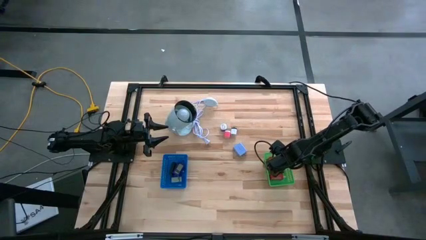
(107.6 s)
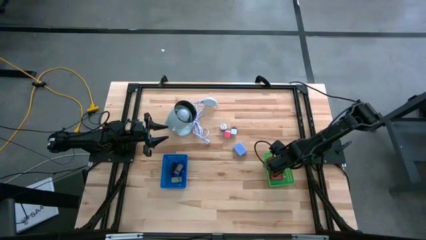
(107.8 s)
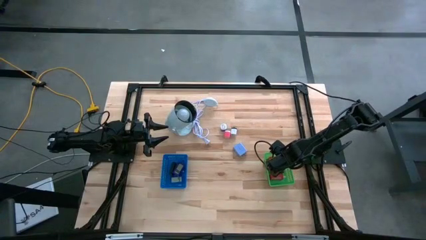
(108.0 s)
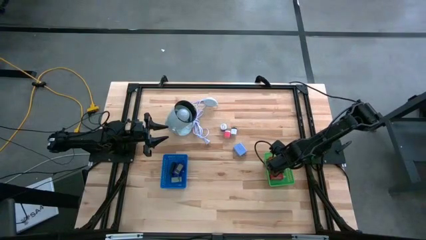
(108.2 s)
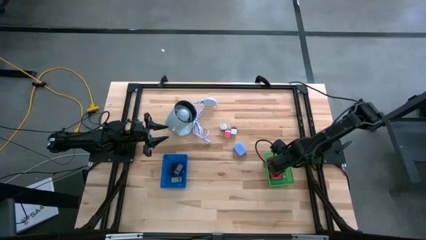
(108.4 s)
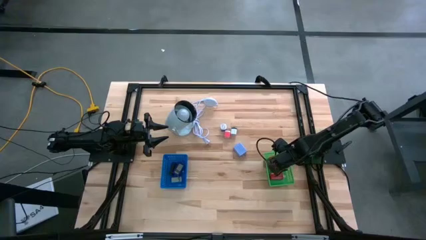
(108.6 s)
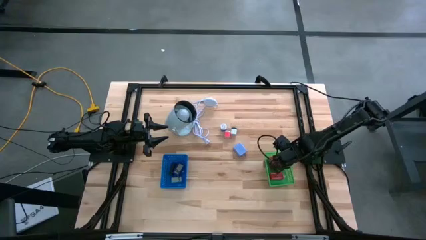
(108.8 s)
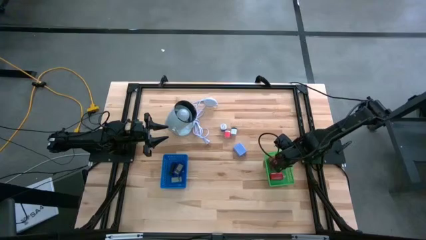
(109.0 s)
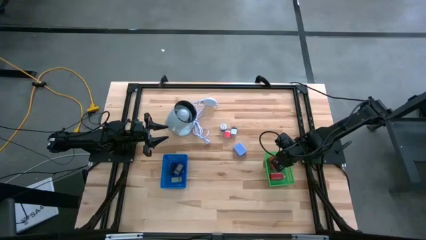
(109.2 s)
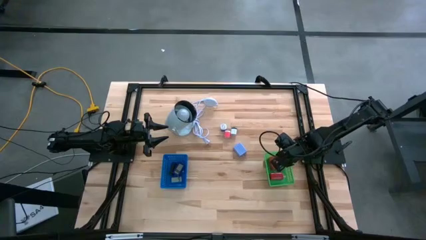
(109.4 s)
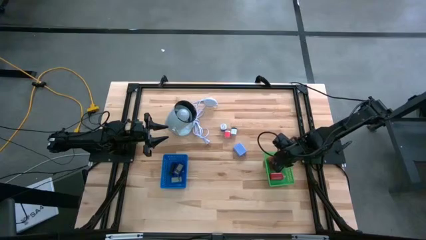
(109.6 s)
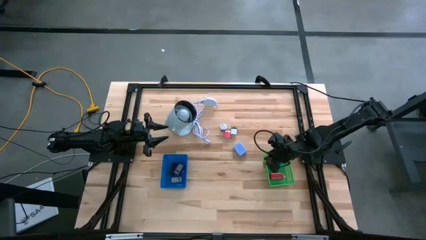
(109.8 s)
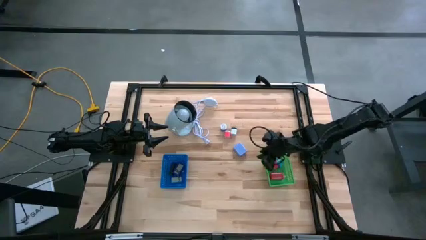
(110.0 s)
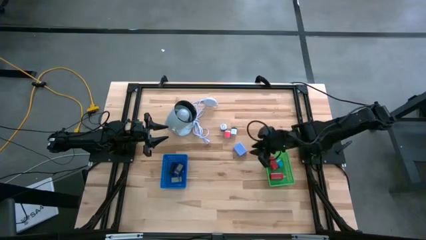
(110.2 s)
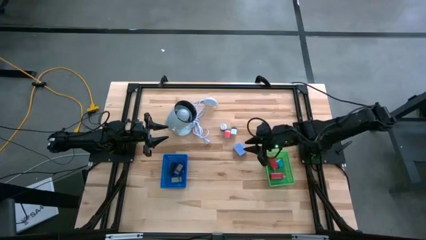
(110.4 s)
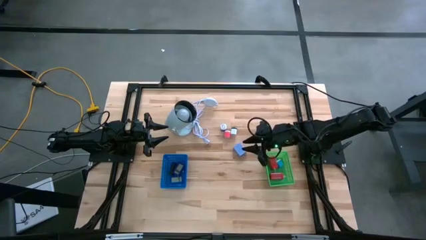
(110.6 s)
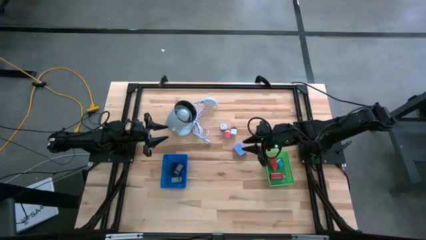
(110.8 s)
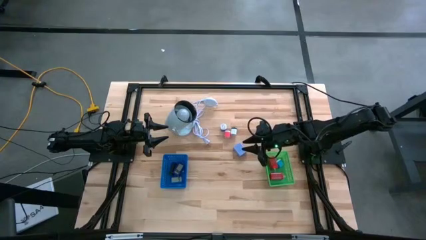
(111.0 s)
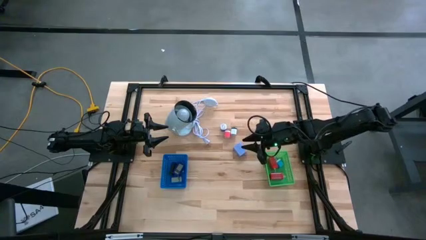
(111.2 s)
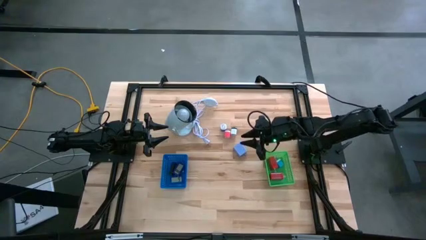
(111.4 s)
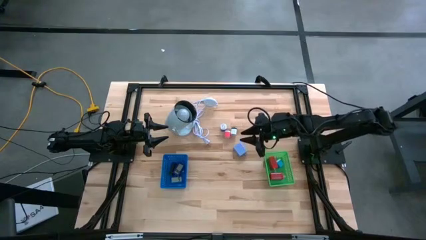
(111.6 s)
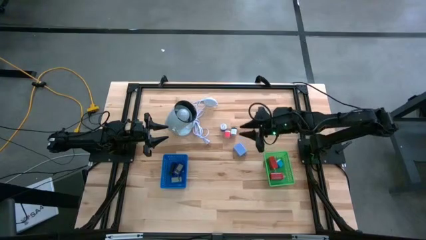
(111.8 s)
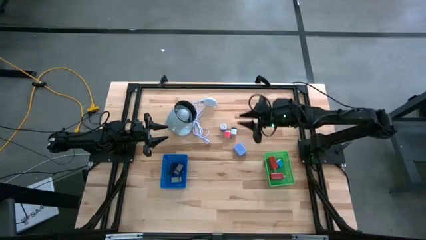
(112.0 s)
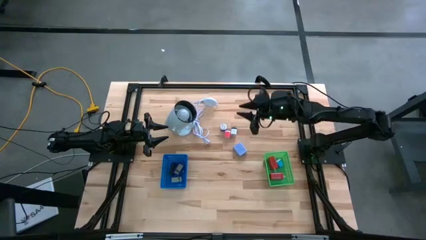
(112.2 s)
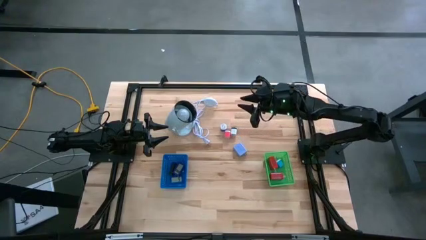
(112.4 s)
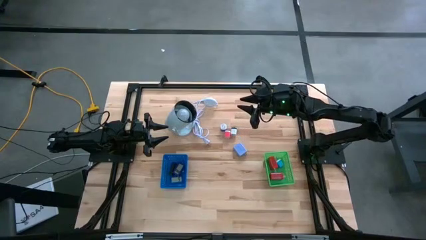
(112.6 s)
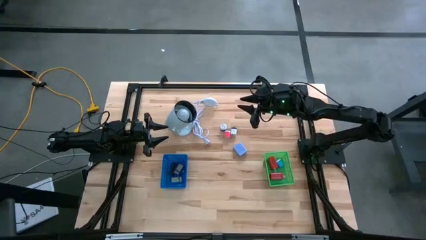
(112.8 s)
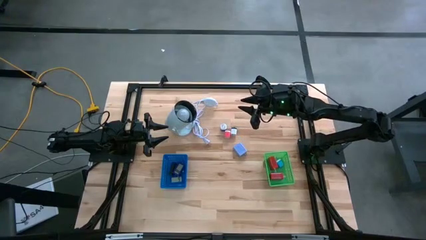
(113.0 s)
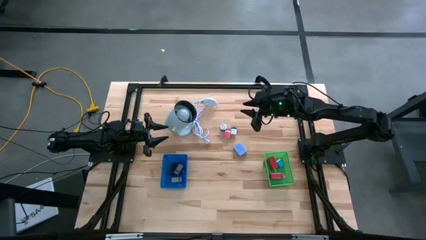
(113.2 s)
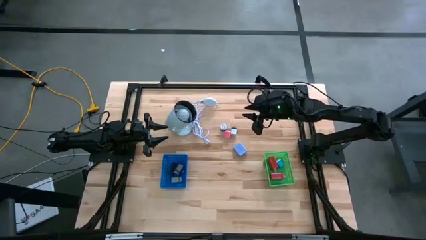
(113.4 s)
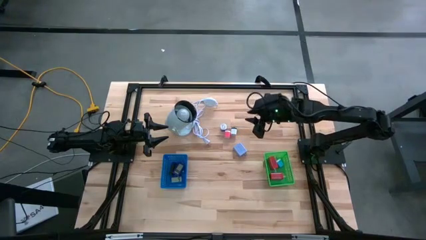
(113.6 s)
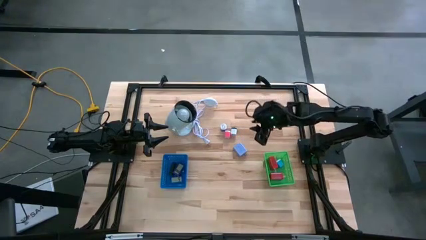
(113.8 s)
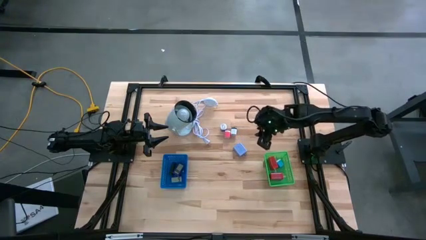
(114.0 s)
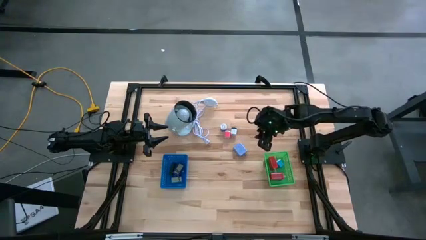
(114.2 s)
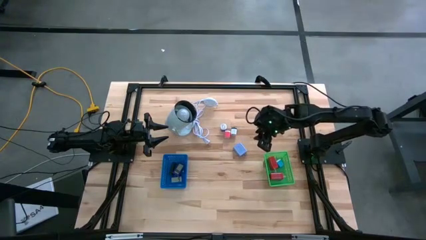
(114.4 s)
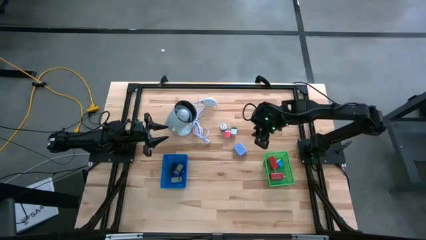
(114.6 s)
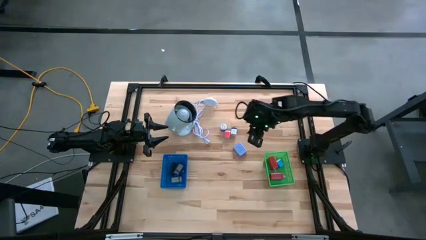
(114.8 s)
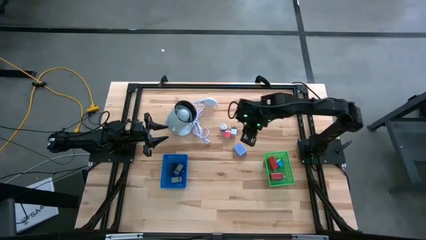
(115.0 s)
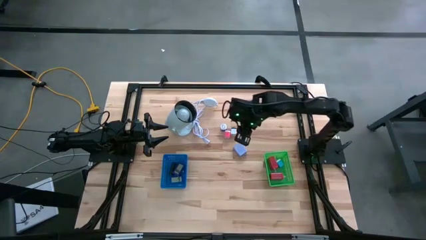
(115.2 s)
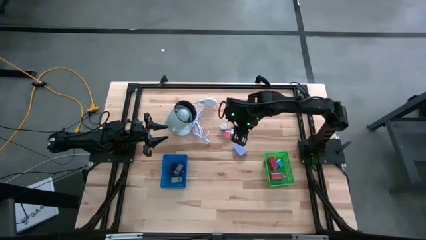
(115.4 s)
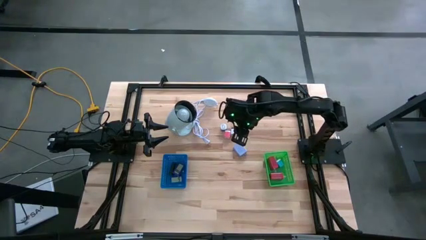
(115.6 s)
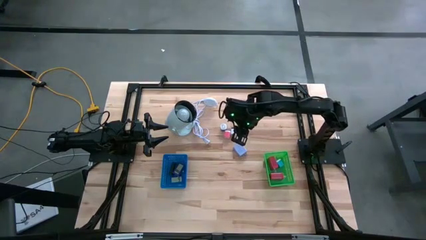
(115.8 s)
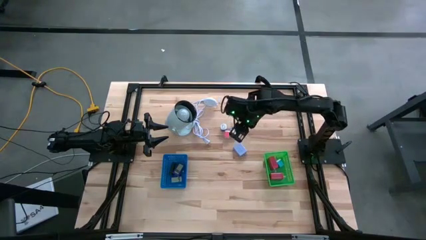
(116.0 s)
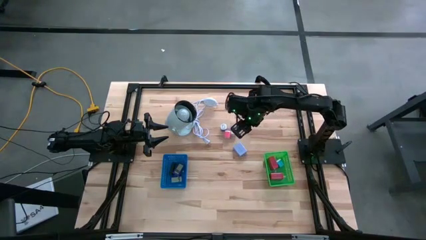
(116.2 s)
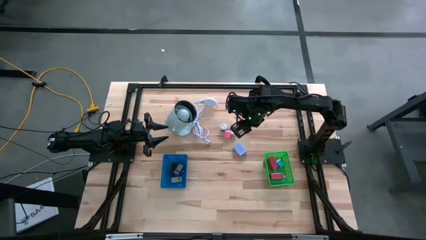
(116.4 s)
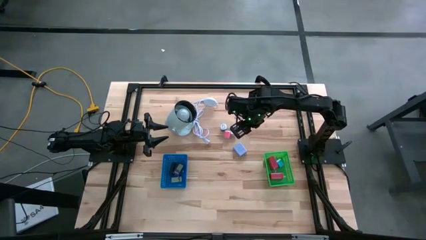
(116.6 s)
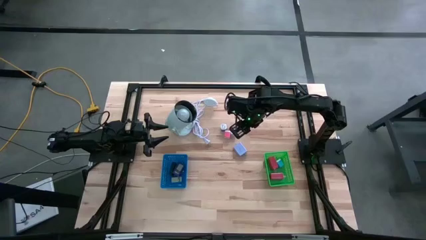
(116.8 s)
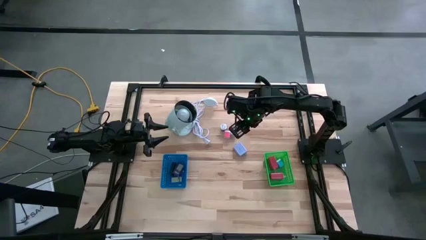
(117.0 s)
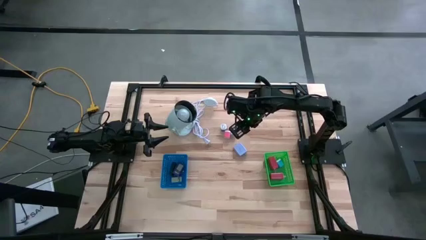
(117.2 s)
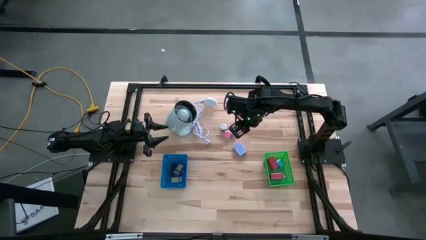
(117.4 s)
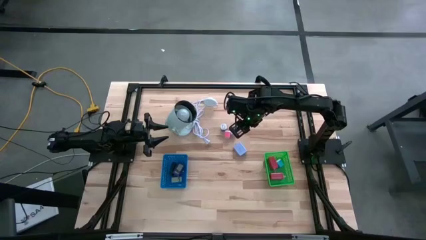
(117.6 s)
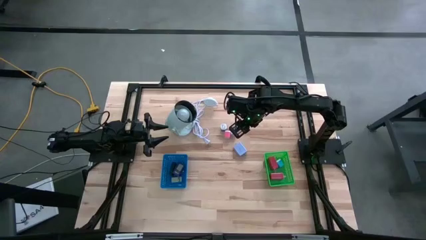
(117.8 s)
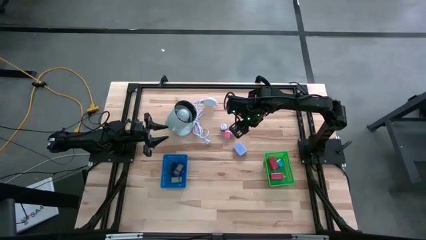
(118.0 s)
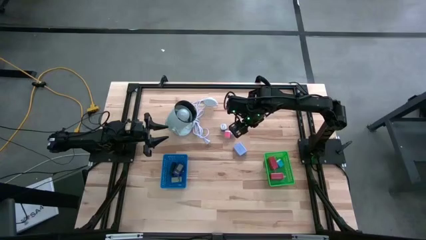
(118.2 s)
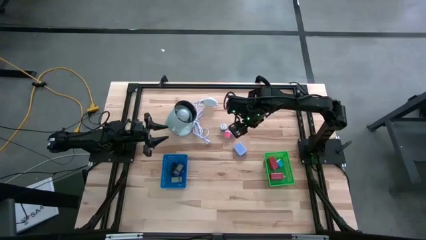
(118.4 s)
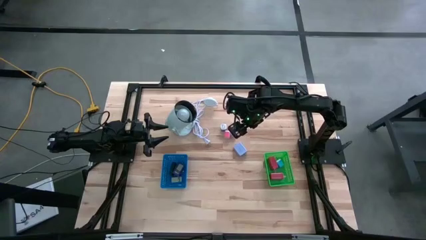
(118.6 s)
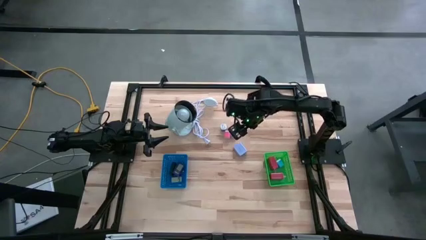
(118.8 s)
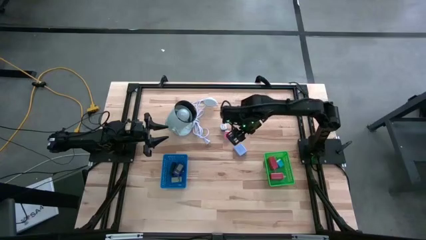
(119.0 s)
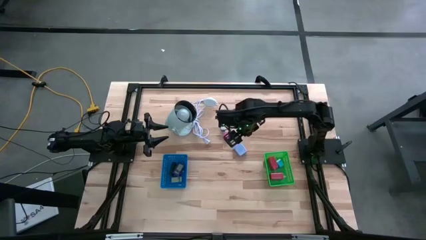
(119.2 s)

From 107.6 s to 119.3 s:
Task: Pick & Place Office items
Put the light blue charger adapter into the green bin

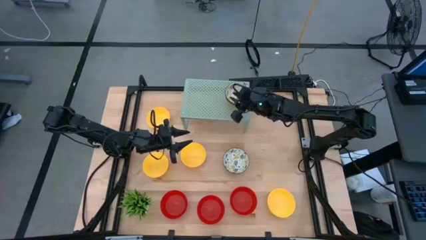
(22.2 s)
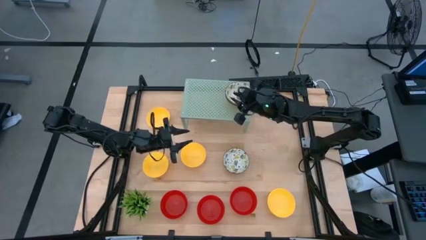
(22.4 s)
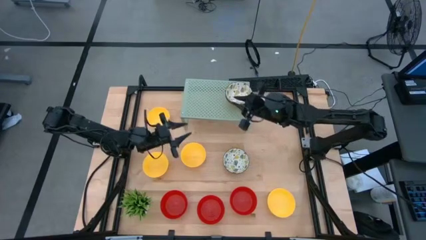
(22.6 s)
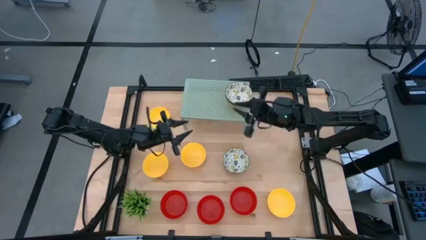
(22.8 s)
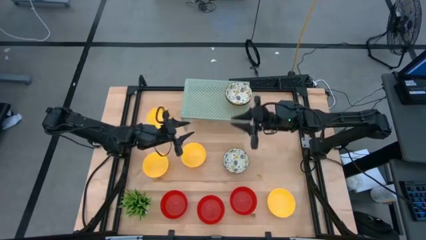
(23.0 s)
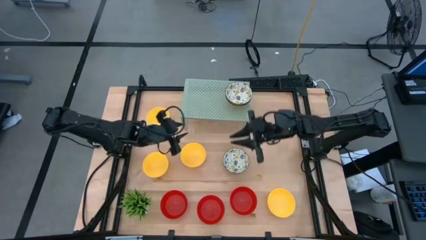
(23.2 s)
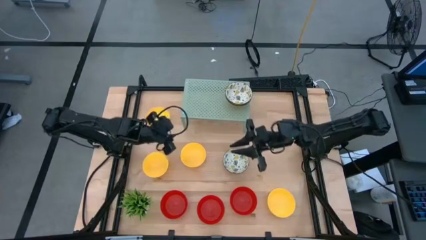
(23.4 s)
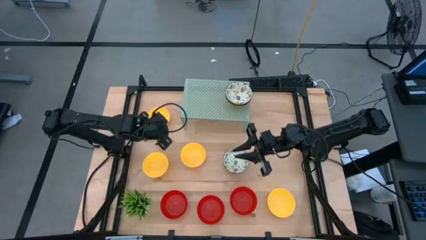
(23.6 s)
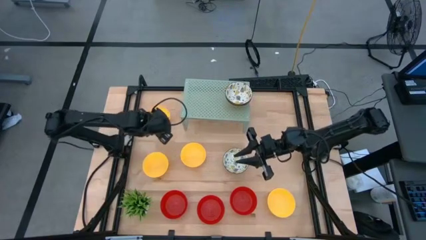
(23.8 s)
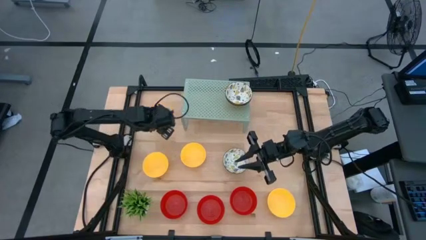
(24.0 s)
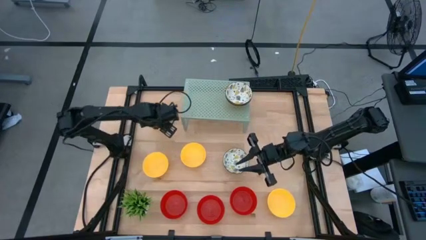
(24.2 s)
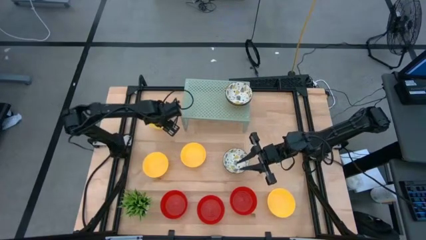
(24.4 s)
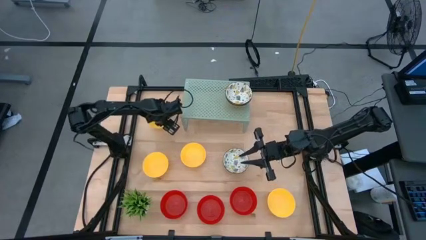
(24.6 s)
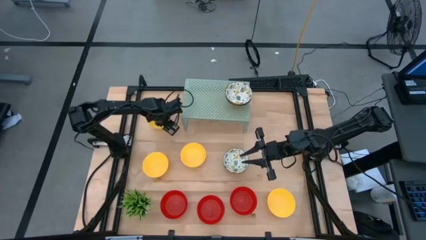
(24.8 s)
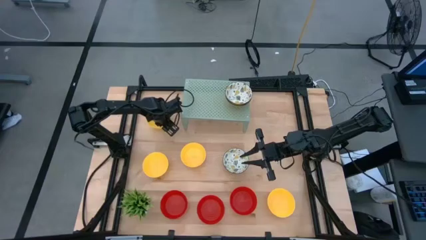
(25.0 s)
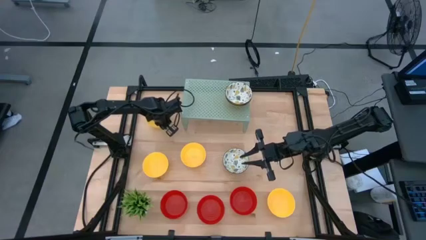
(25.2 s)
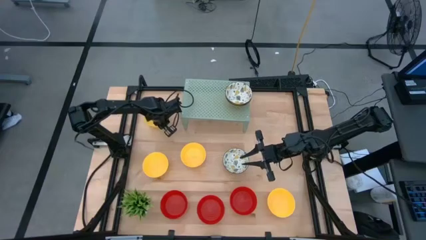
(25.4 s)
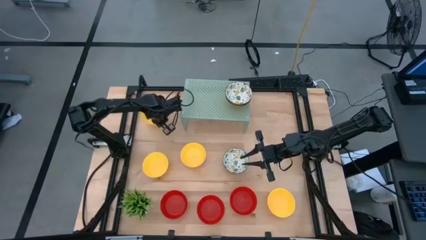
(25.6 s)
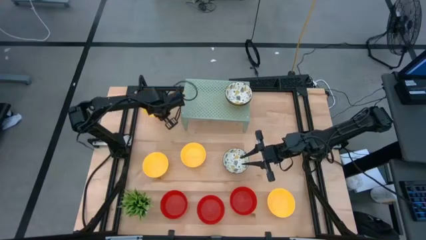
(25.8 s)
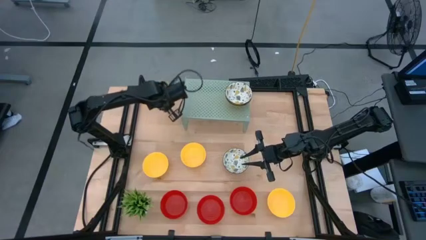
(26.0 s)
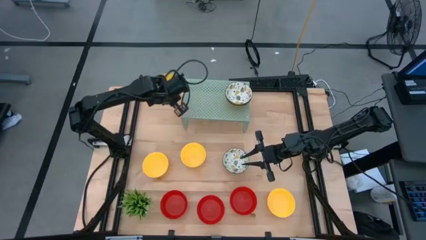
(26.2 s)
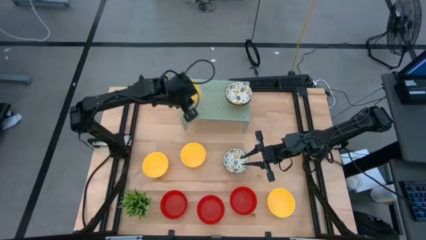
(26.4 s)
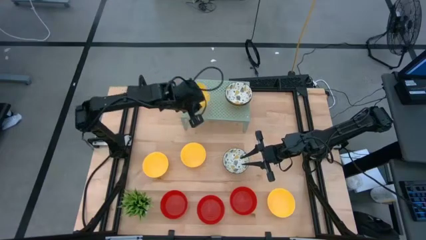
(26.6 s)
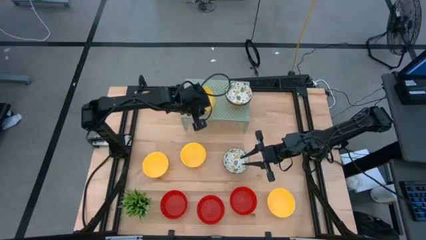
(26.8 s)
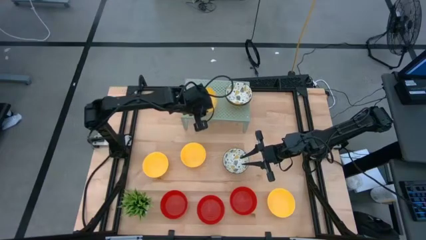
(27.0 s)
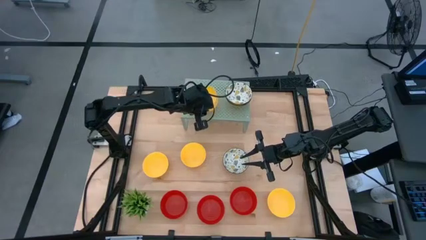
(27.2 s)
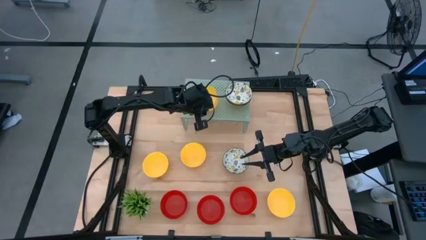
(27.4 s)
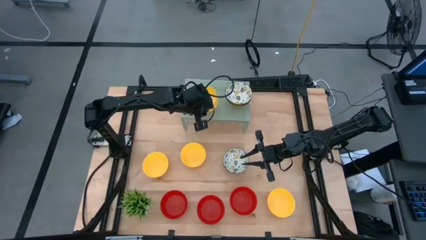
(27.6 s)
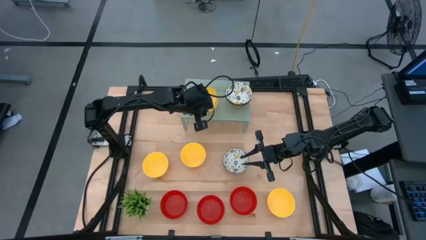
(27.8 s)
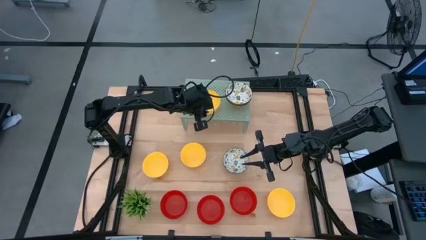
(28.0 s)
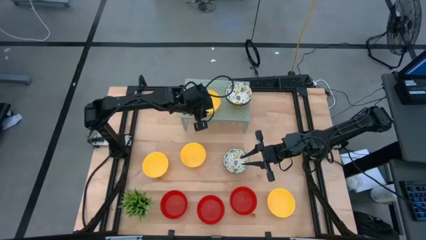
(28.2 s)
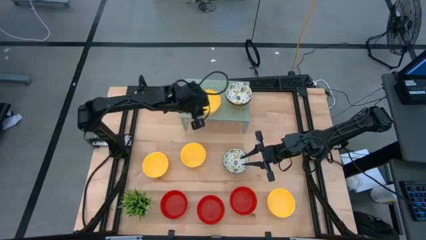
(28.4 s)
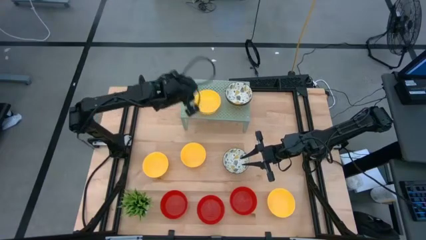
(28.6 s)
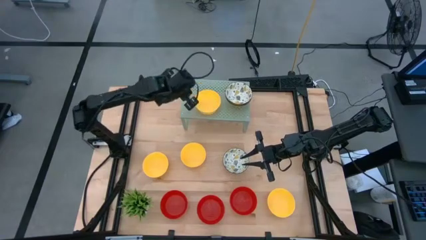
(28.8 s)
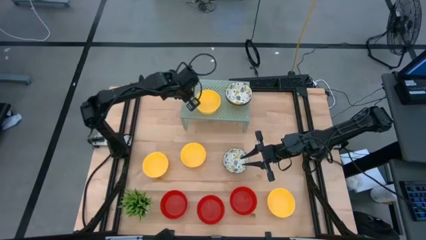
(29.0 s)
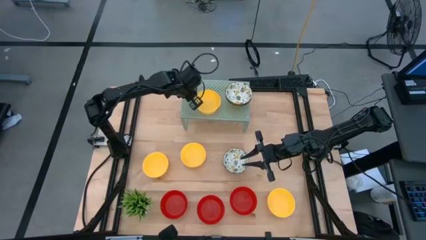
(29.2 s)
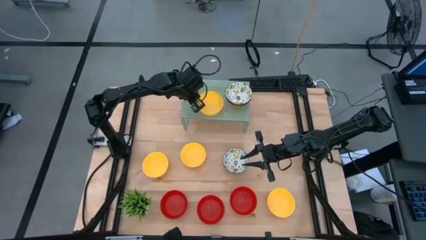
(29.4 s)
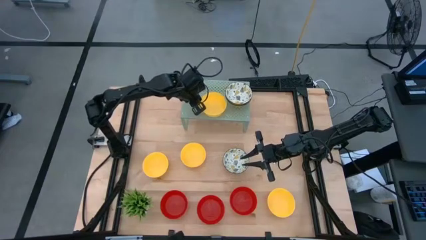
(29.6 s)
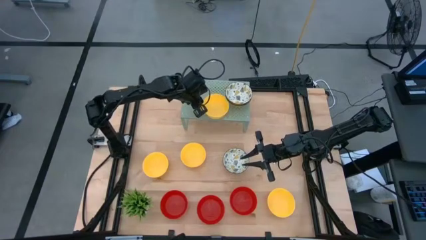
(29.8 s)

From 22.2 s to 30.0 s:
Task: Pick & Place Mini bowls
Put the yellow bowl on the shelf
